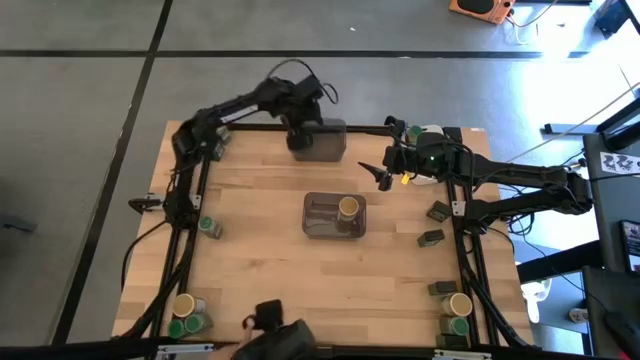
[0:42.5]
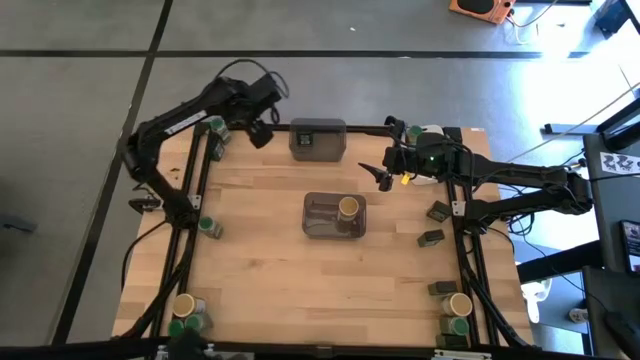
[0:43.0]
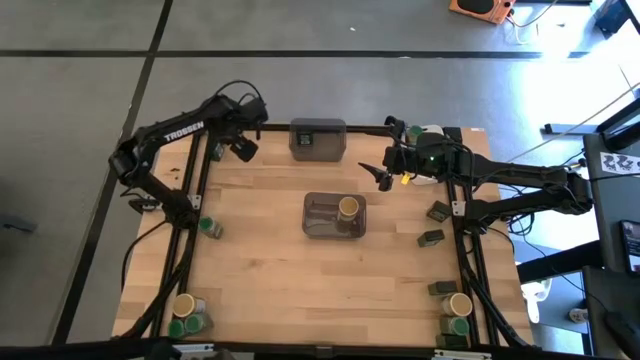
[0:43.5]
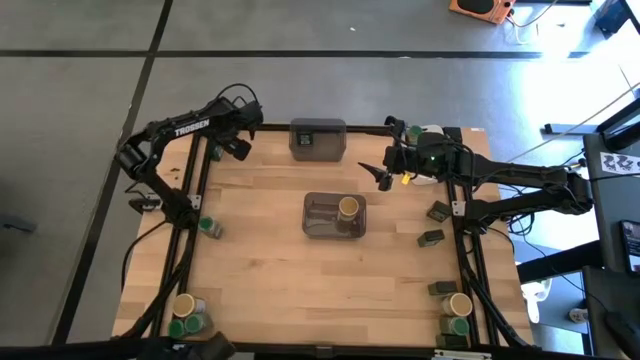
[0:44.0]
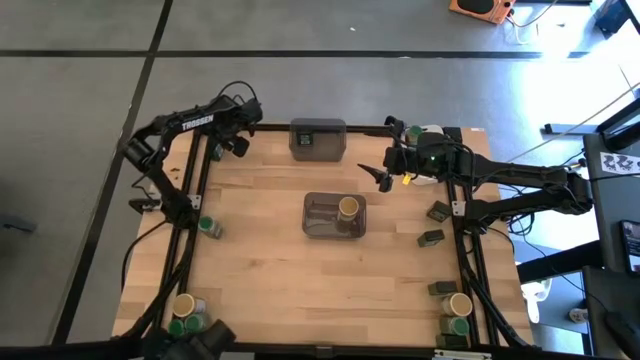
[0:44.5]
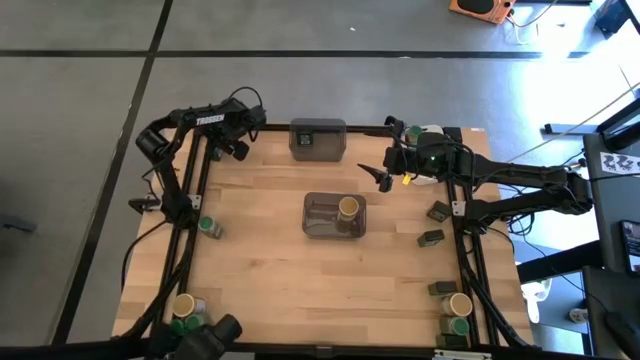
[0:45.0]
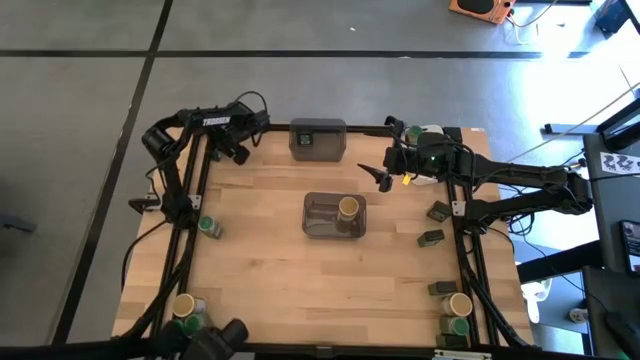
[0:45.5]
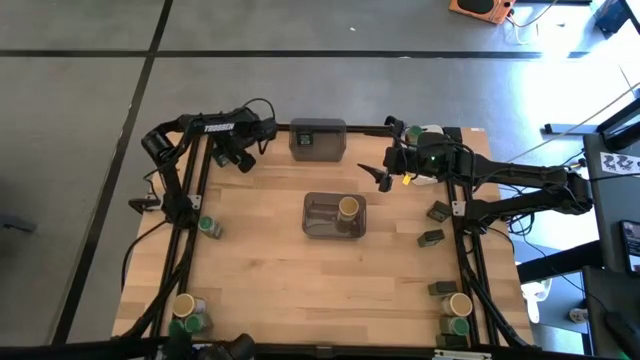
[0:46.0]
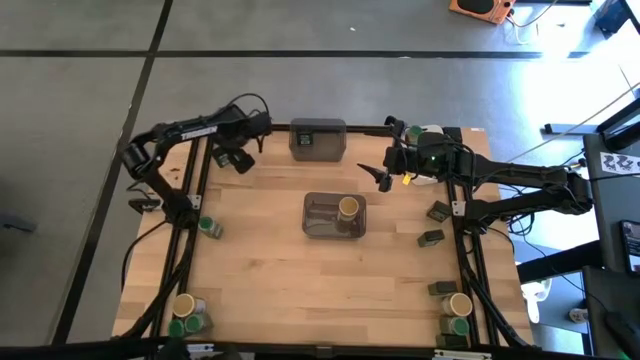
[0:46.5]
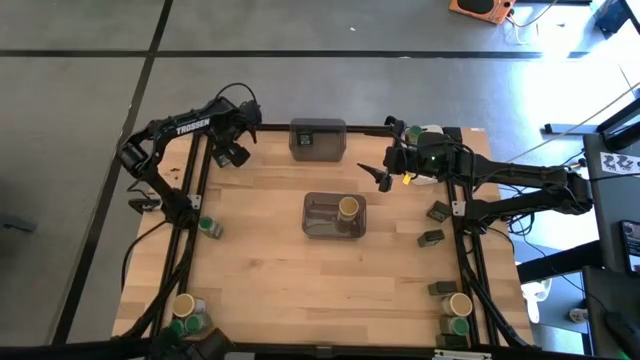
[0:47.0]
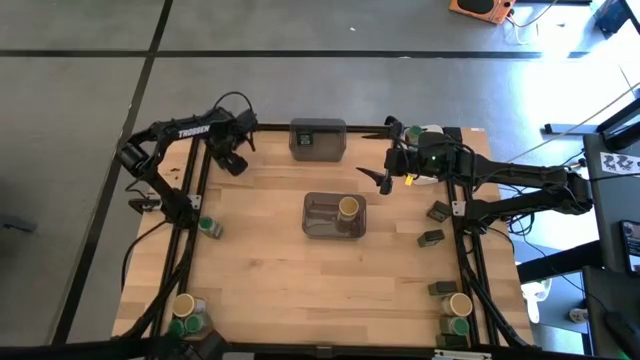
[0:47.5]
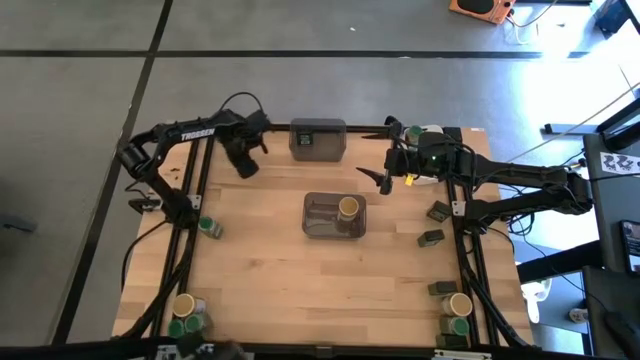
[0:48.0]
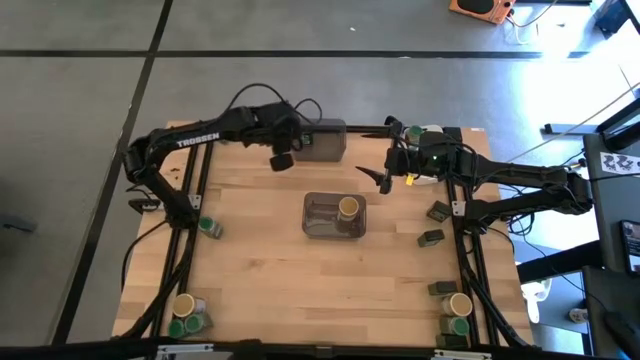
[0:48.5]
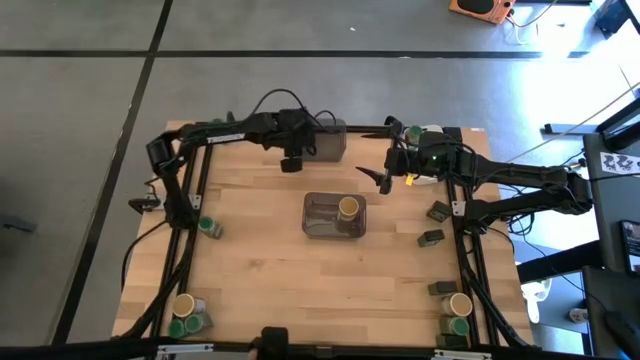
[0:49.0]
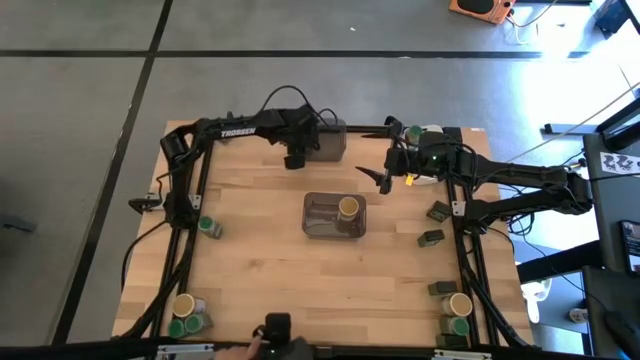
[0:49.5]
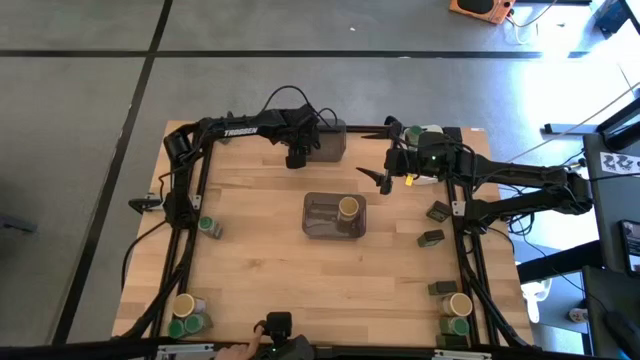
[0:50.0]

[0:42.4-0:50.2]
Task: Sort spices by type
Put the black seasoning can into the top black bin

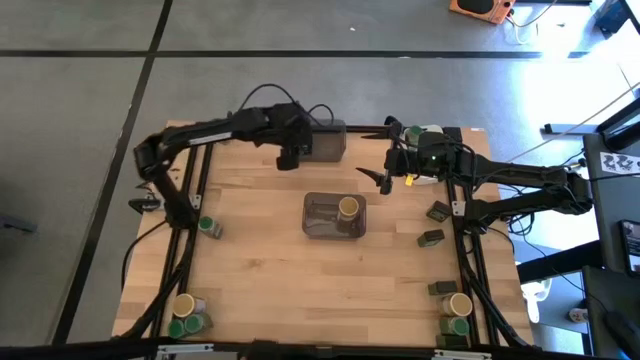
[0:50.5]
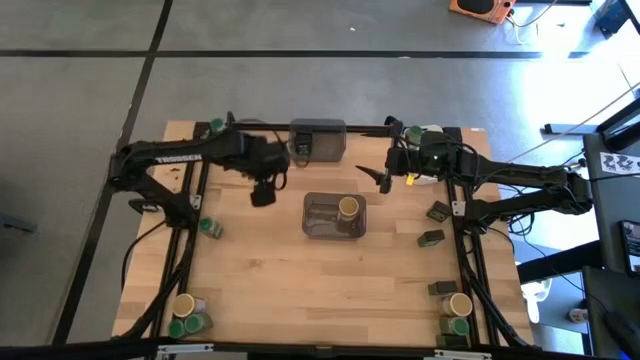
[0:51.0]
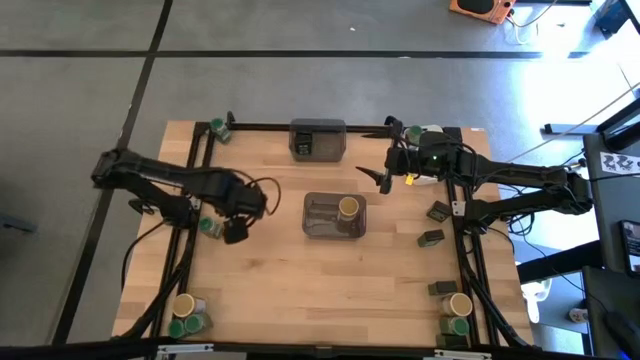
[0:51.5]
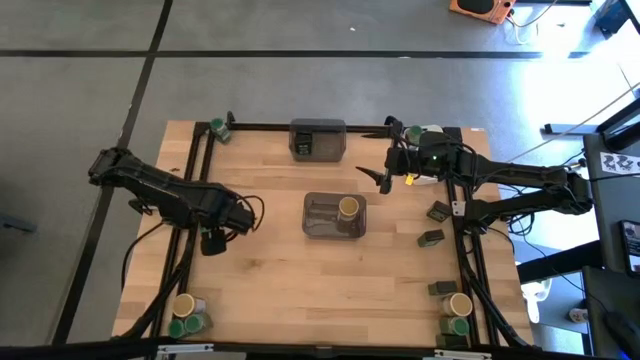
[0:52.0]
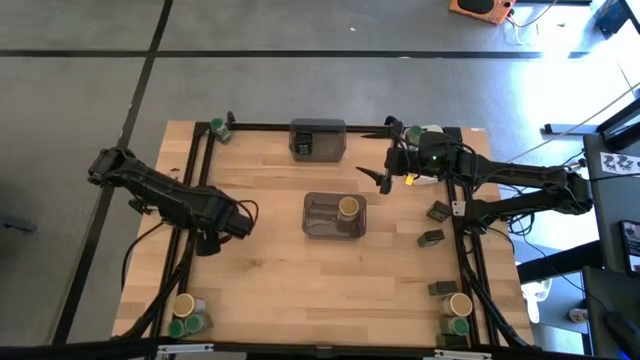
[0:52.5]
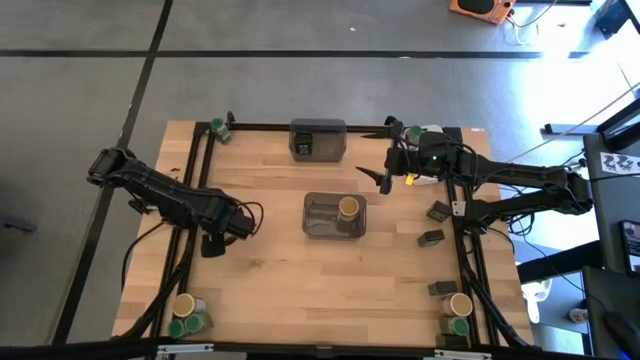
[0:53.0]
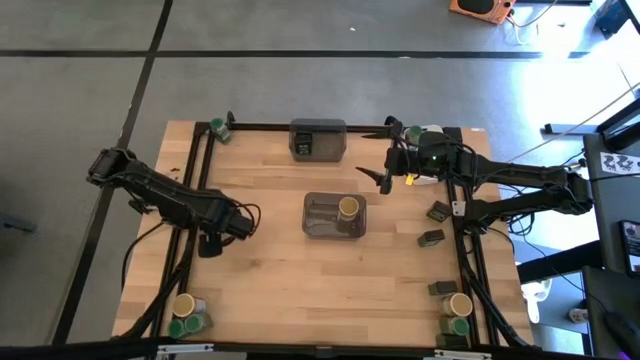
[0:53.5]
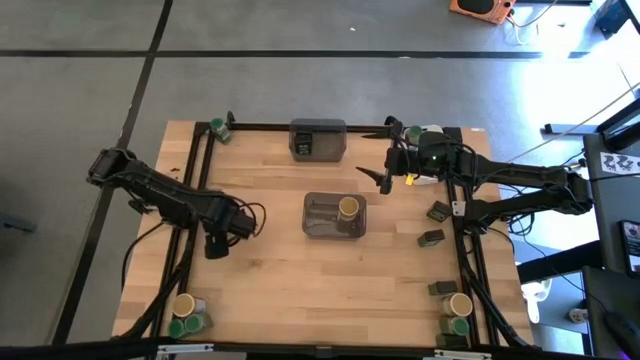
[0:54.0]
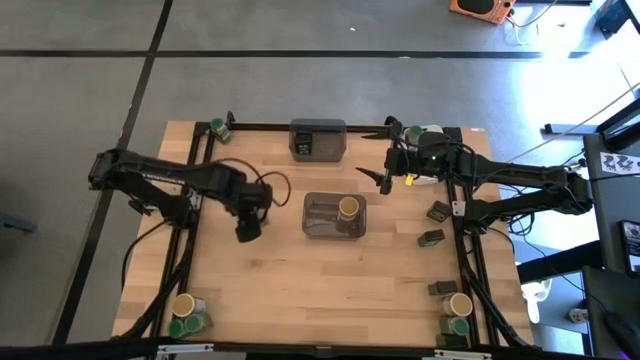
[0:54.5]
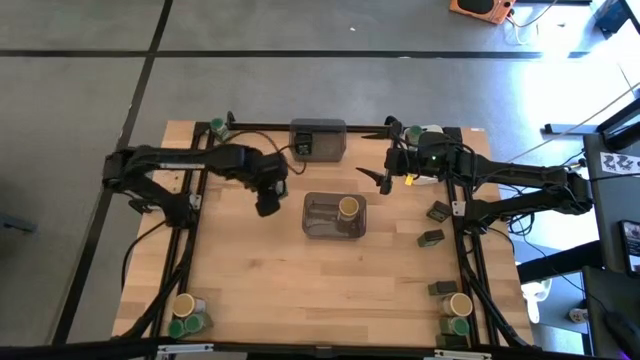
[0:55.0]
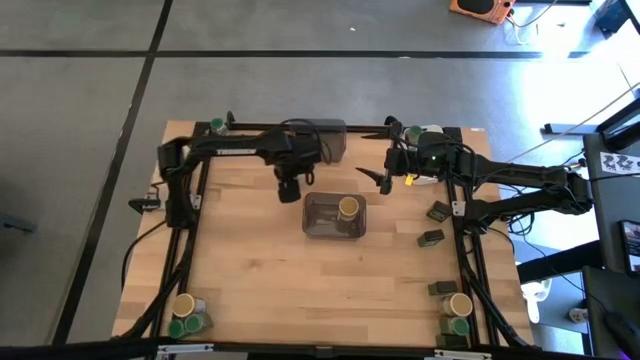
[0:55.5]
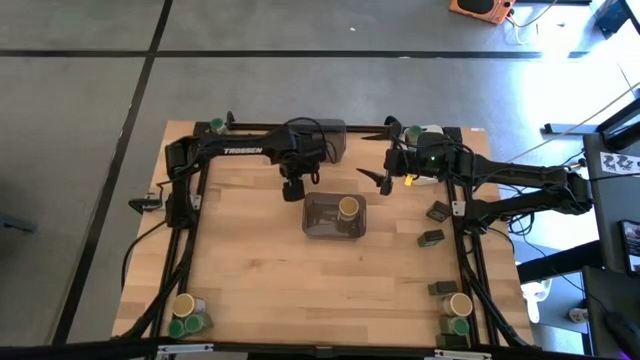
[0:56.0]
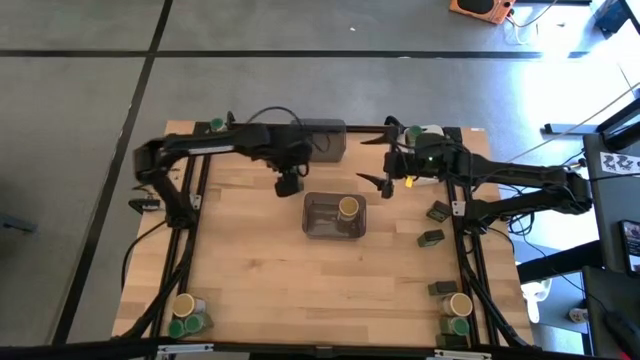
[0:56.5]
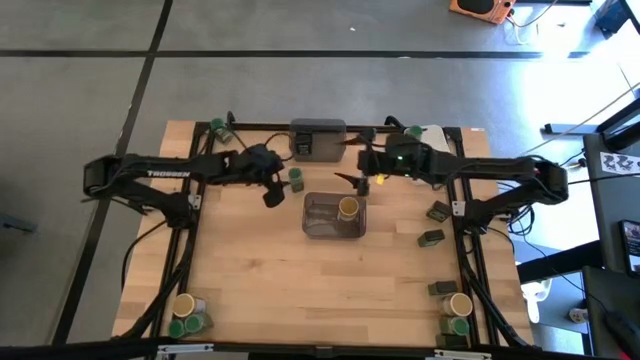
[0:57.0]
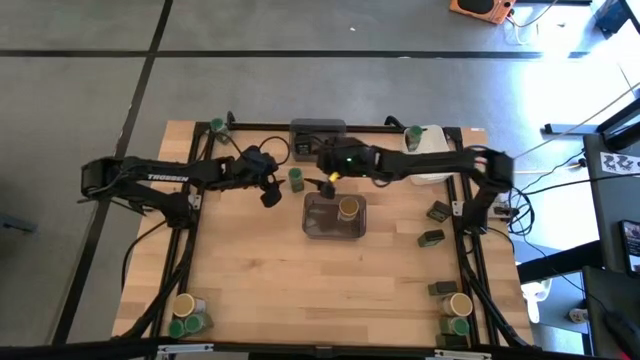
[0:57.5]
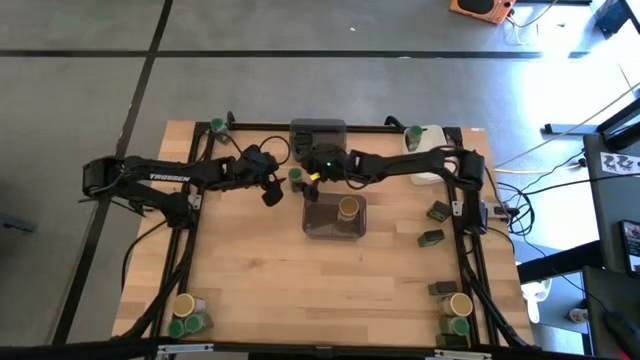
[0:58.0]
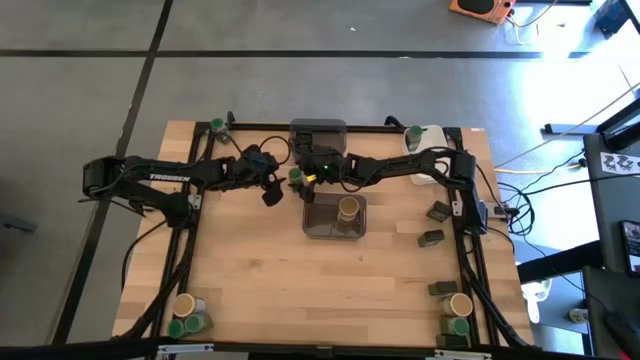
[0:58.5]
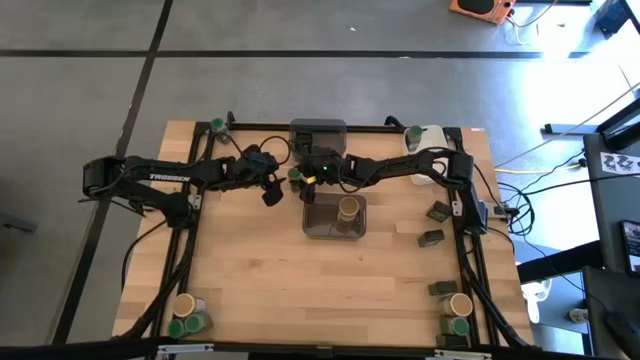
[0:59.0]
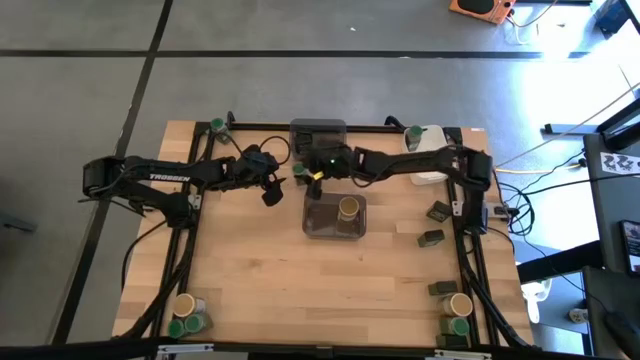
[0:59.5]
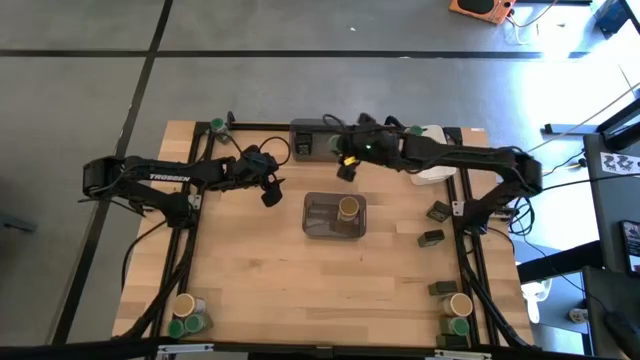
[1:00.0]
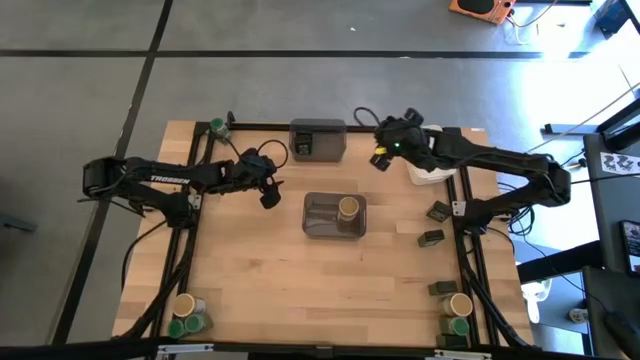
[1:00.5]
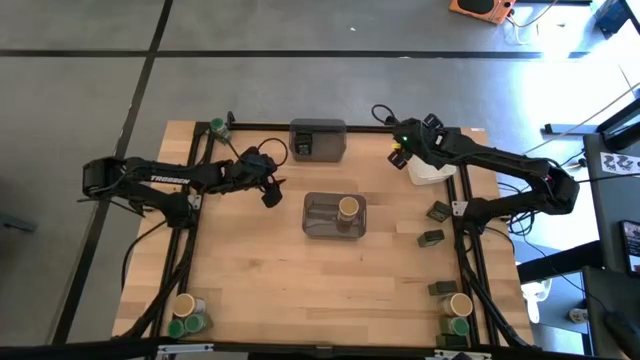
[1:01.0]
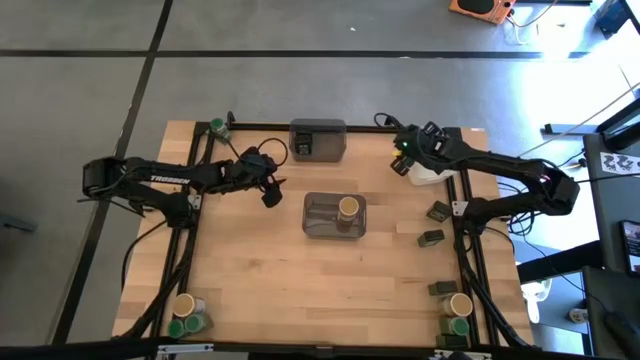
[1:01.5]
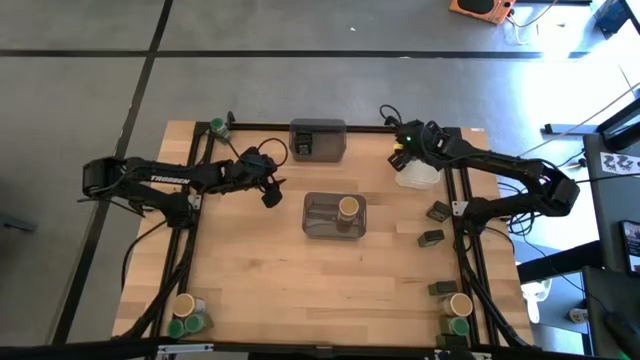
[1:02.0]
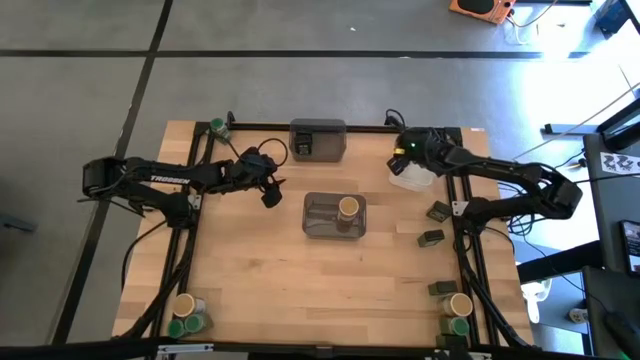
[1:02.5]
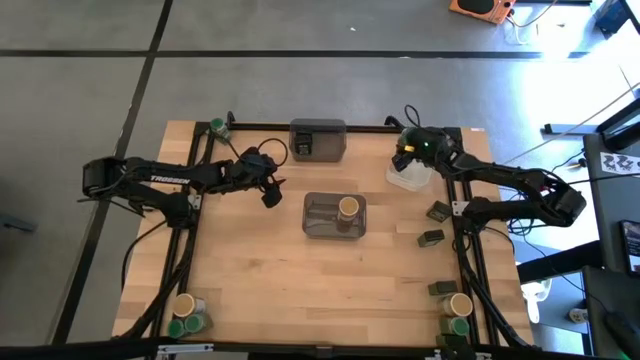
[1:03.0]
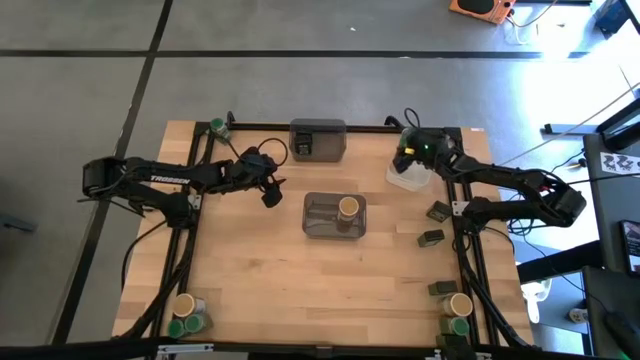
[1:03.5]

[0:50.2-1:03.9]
Put the green seasoning bottle into the white bin

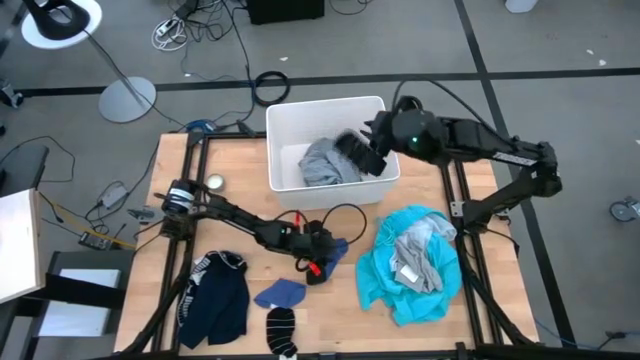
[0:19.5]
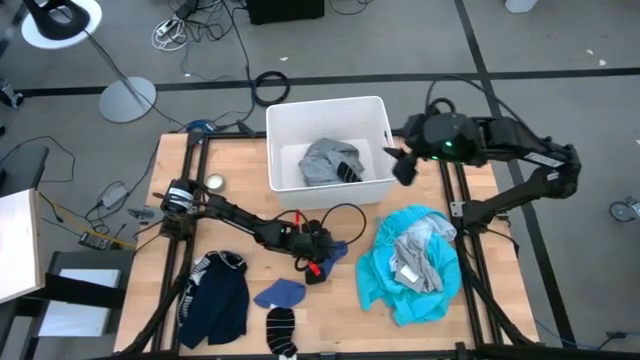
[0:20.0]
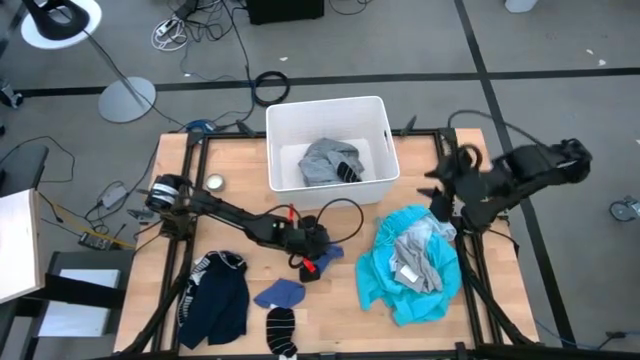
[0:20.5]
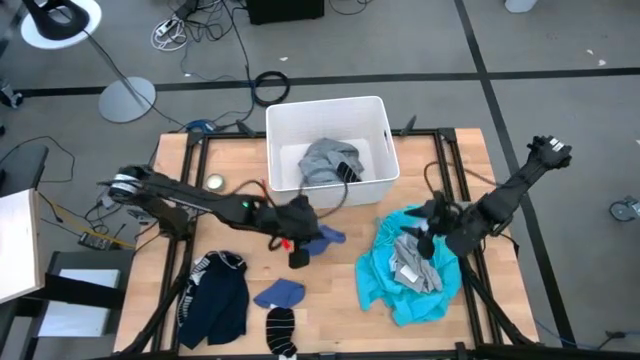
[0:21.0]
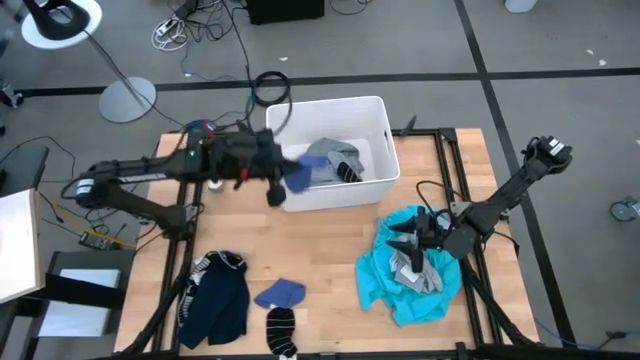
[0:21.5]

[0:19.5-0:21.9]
Task: Sort clothes
Put the blue sock into the white laundry organizer
